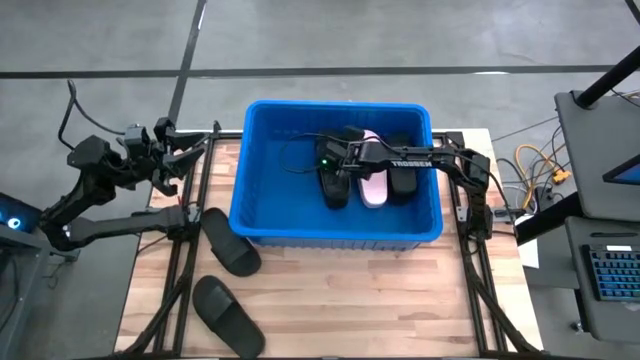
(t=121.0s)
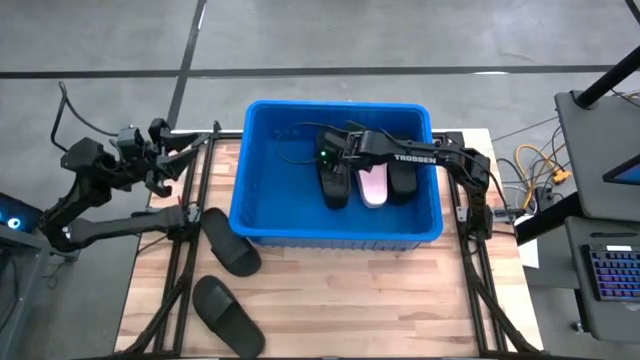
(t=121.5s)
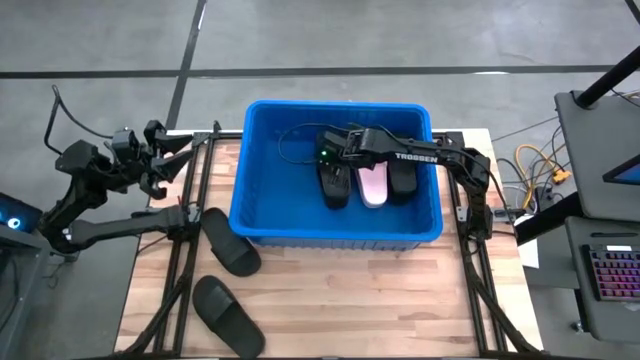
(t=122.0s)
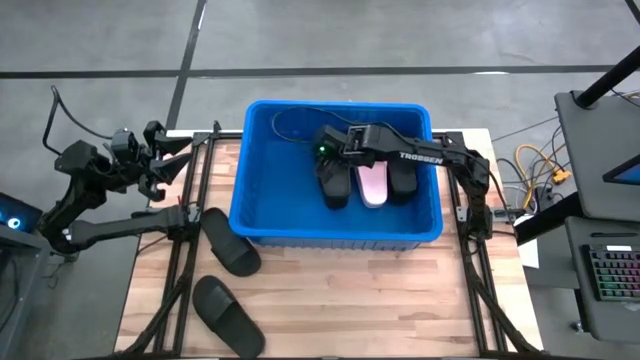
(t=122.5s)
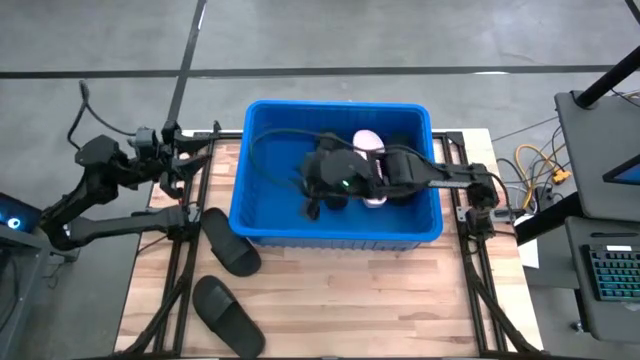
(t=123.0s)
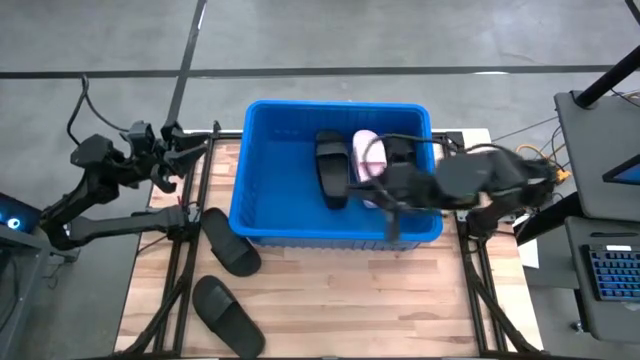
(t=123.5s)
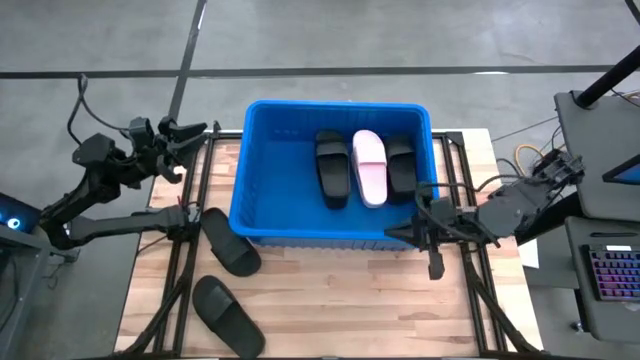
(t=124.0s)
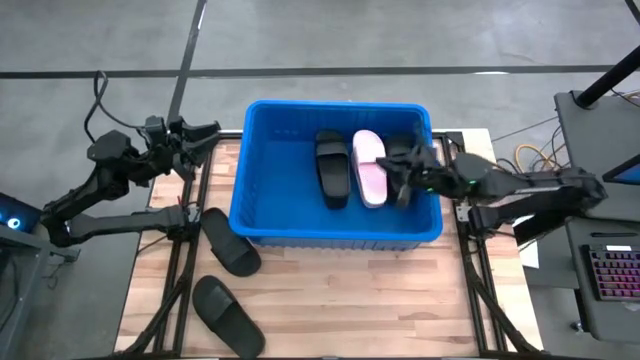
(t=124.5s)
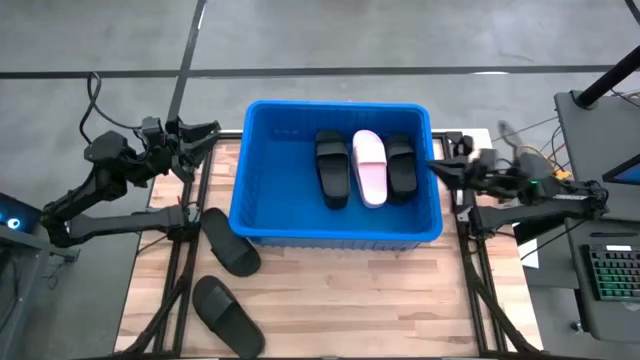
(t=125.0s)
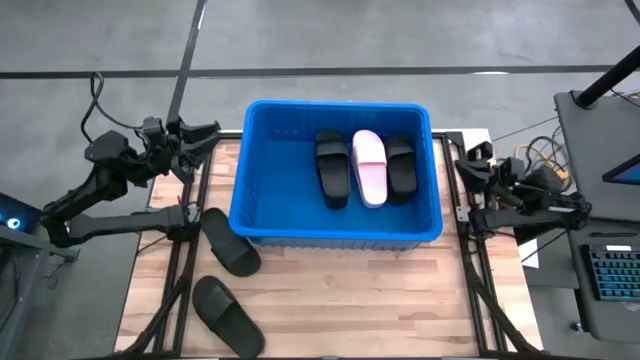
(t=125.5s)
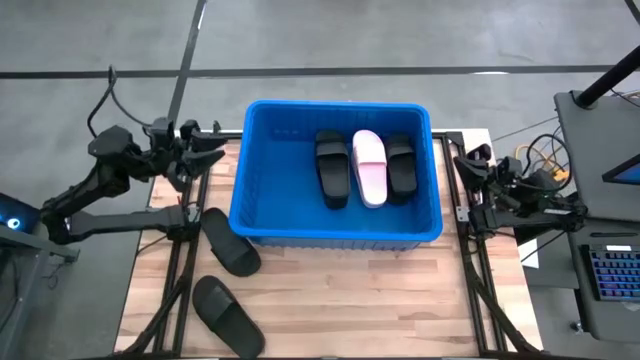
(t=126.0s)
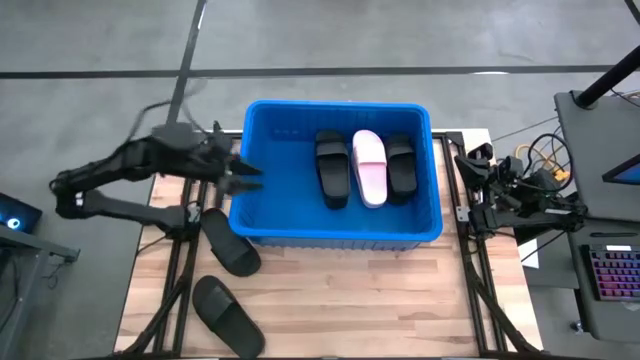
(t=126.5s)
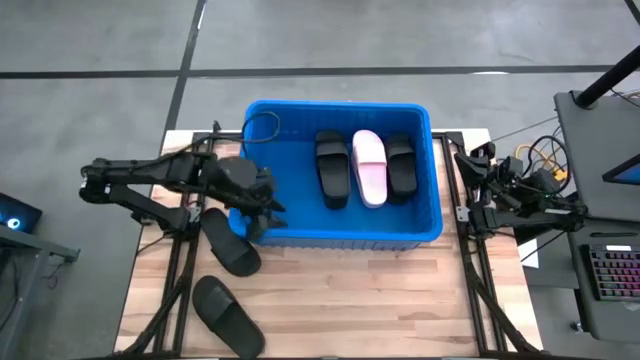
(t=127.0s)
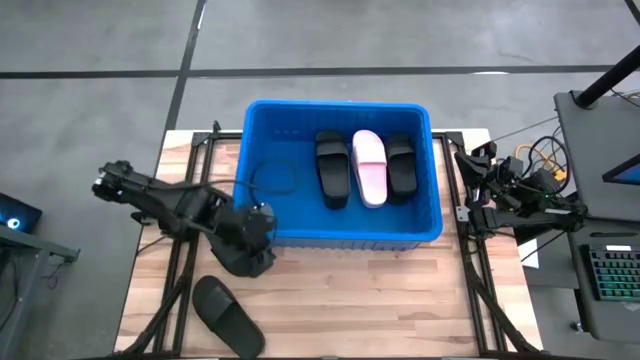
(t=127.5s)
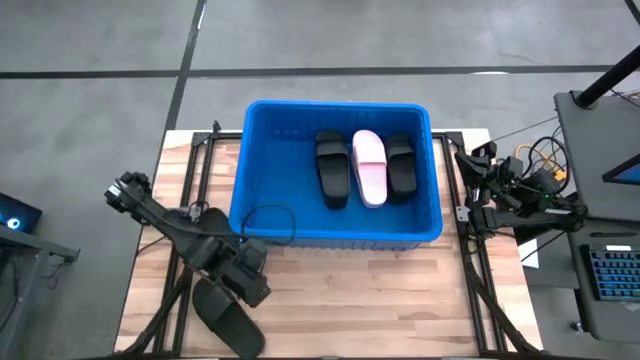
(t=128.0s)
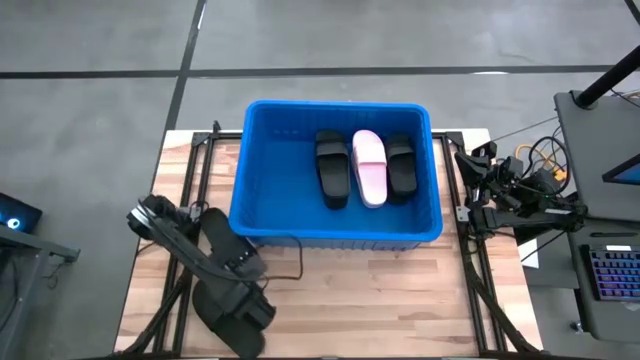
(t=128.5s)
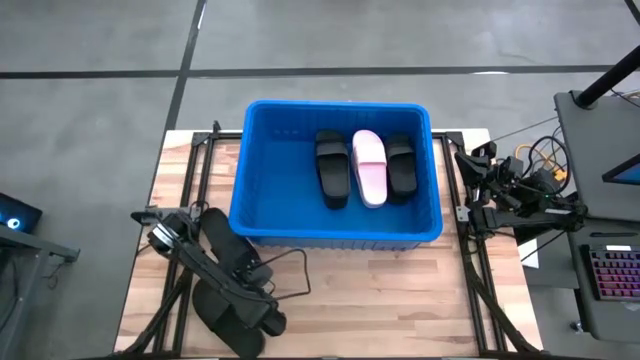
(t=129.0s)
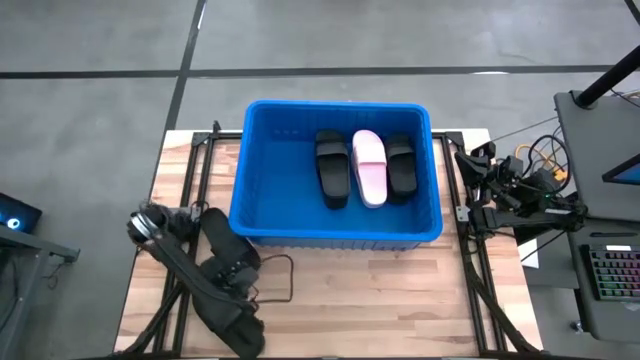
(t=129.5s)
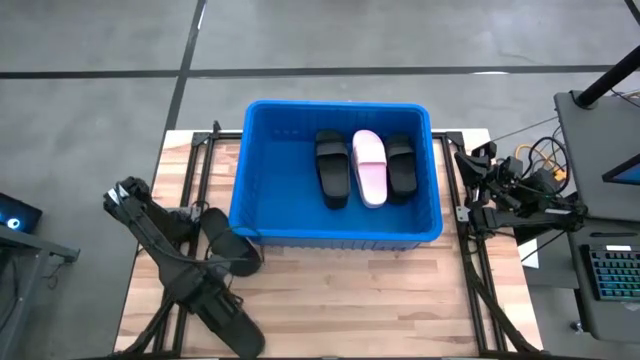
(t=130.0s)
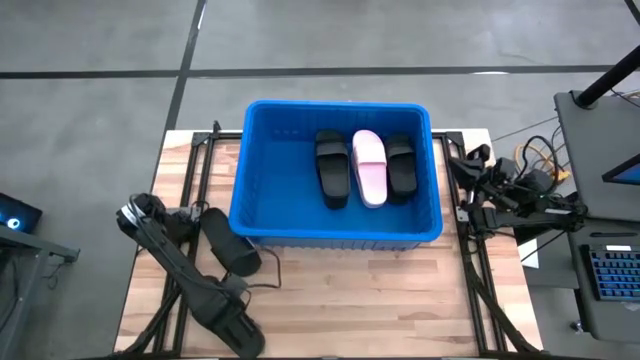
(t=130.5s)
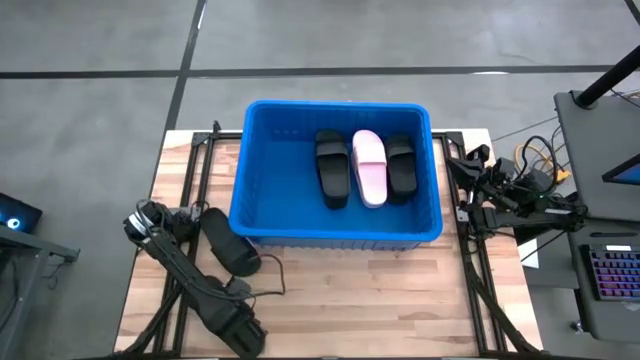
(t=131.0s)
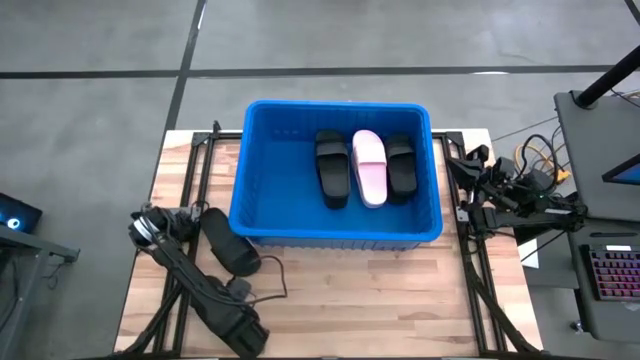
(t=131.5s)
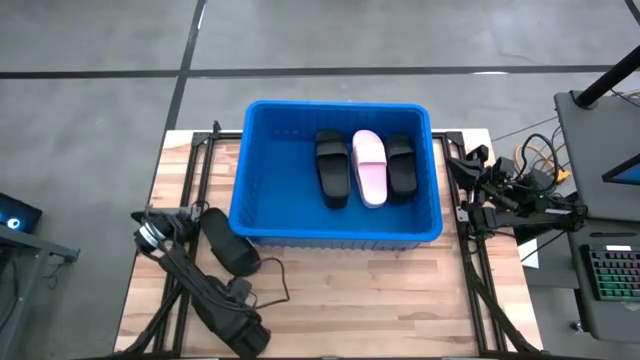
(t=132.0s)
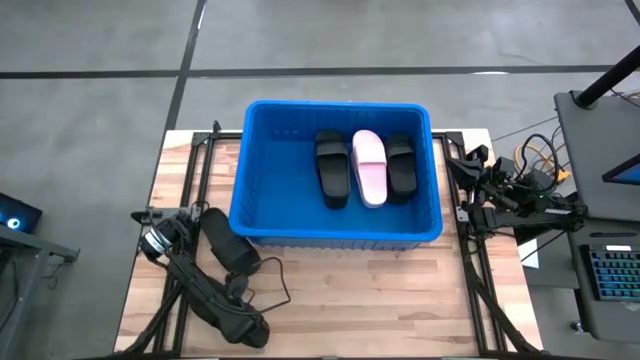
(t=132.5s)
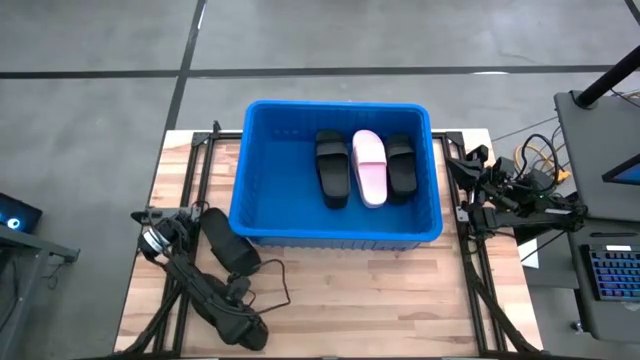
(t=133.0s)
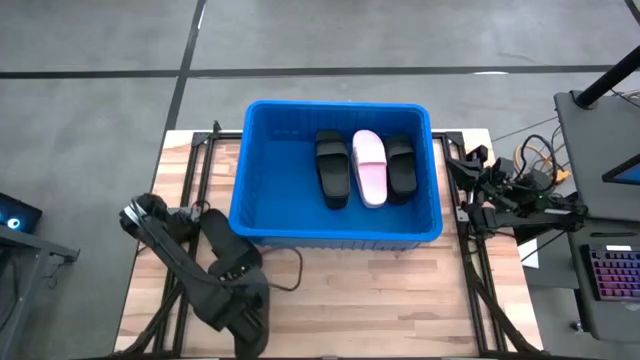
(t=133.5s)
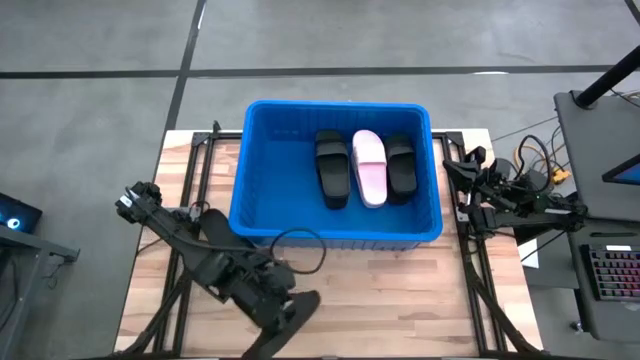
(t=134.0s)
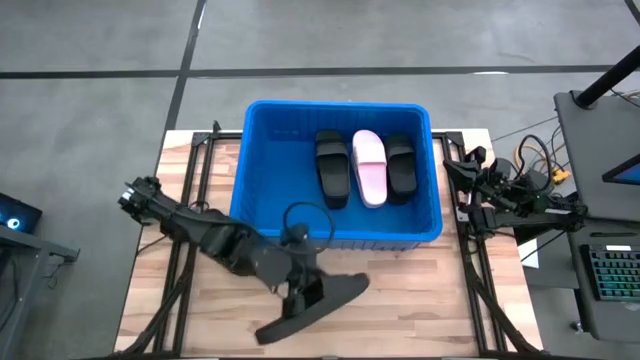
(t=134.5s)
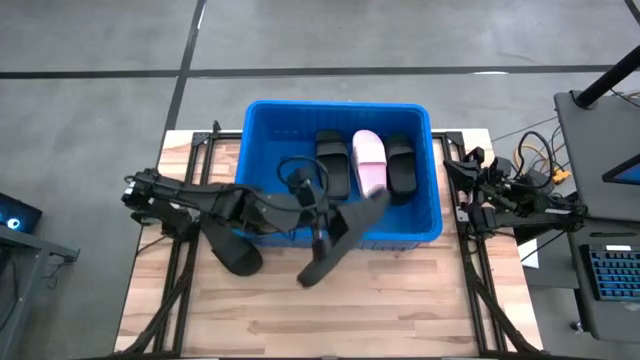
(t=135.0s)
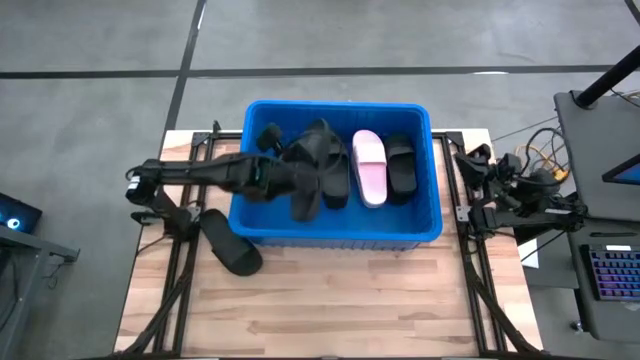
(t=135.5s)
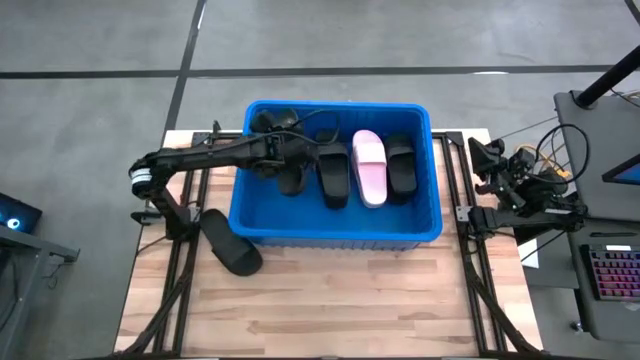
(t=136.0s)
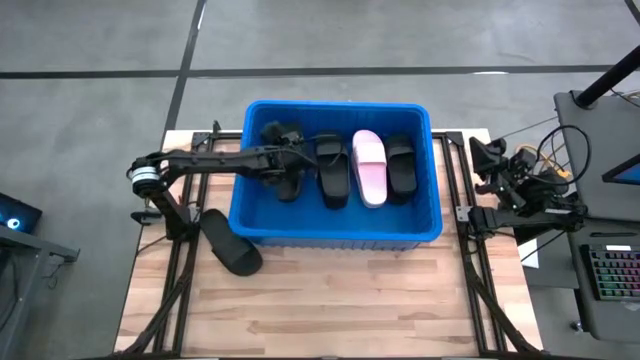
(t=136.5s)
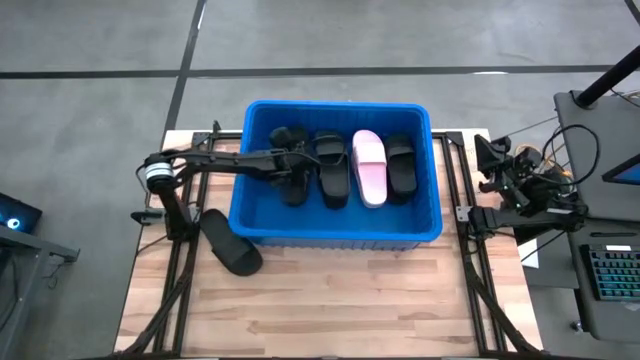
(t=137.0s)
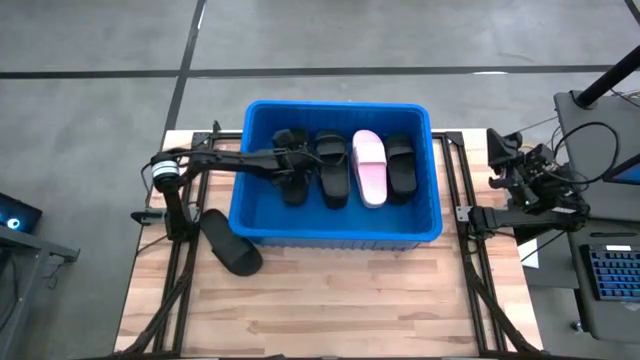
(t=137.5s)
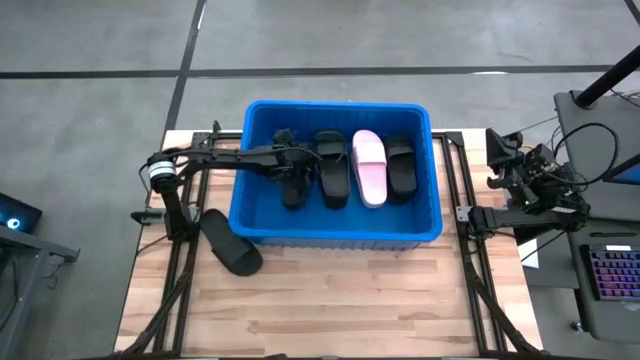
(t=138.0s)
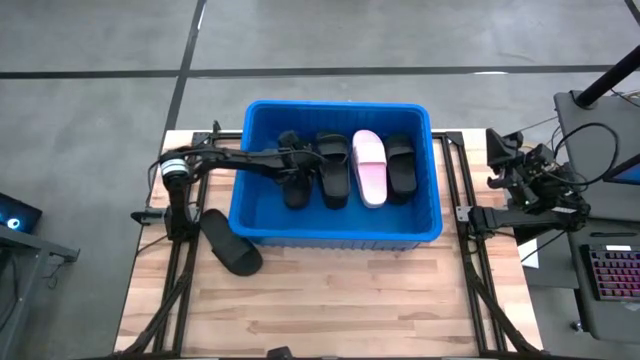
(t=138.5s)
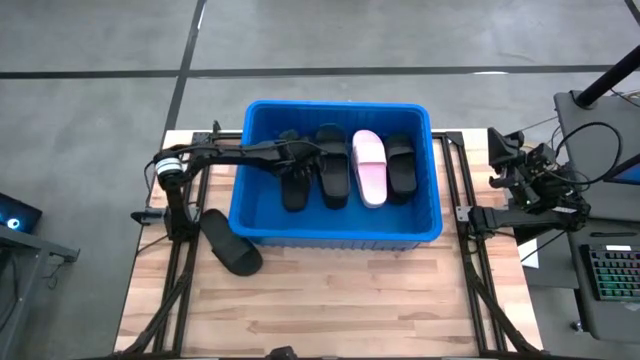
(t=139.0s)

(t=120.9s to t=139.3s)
Task: Pick and place slides into bin
Put the black slide into the blue container

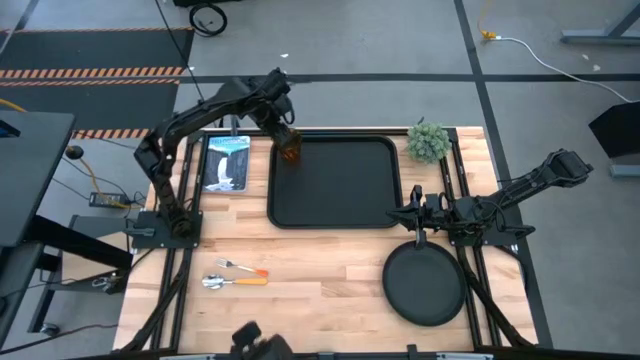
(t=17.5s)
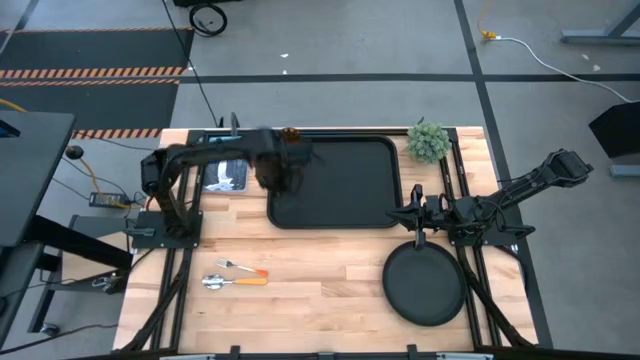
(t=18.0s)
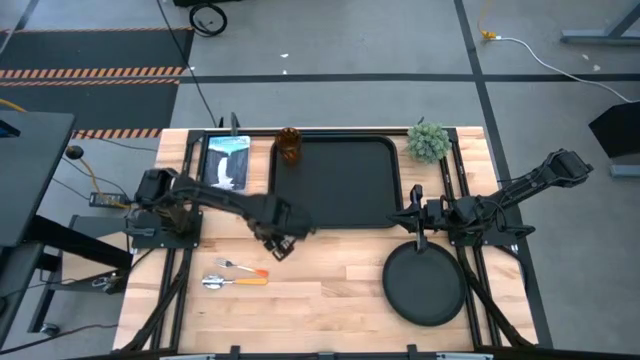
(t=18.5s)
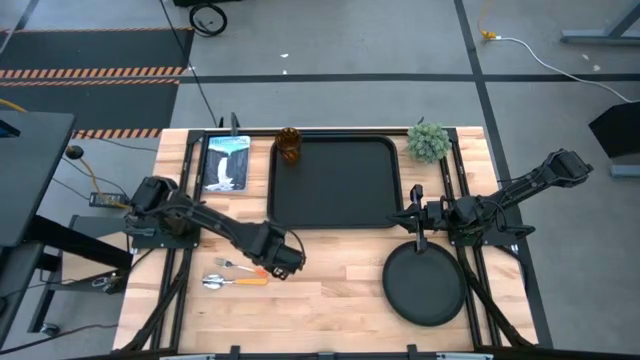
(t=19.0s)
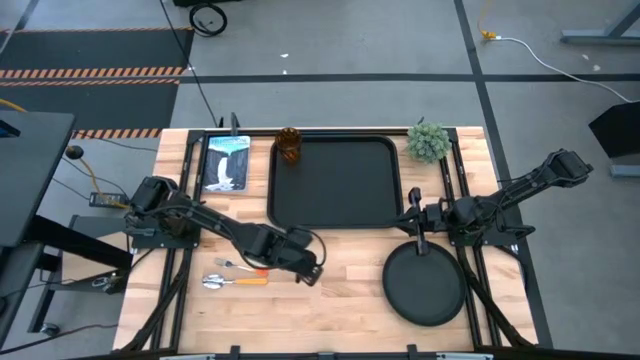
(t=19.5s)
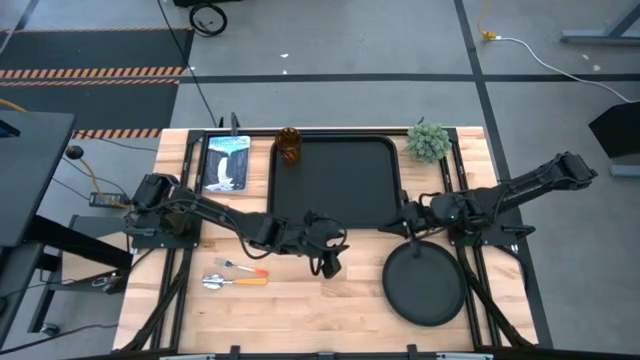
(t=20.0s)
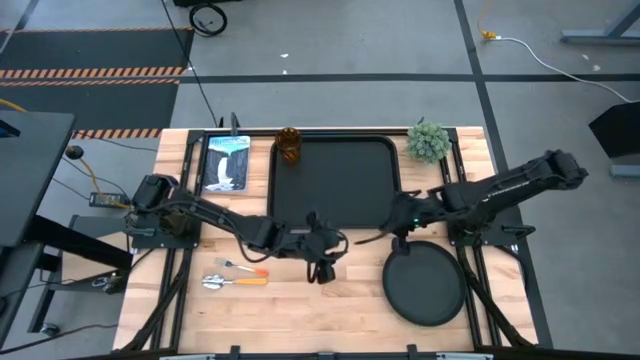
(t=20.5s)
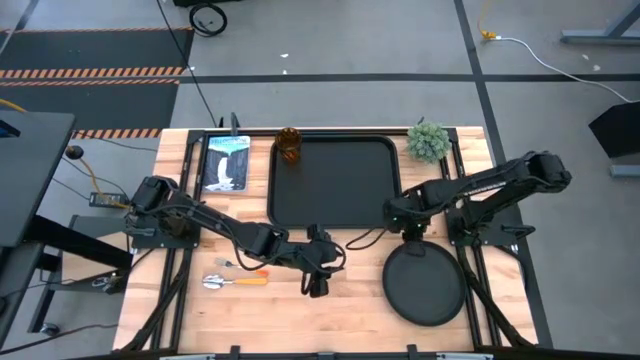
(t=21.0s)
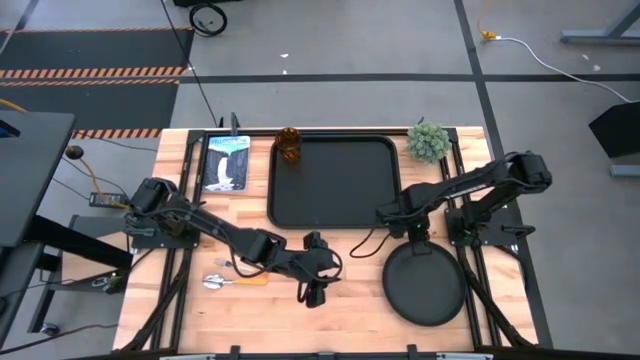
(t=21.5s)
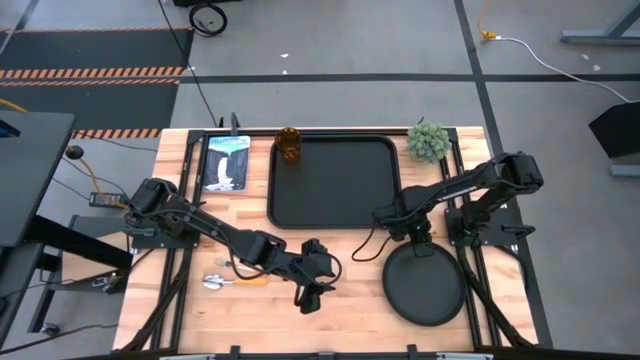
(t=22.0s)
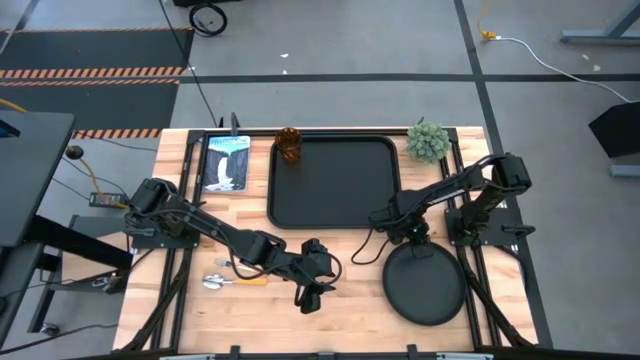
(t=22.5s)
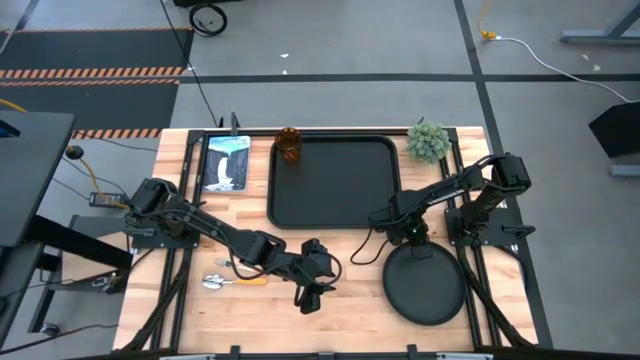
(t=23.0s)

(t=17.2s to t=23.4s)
Task: Pick and place plate/cup/fork/spoon on tray
Put the black plate on the black tray
